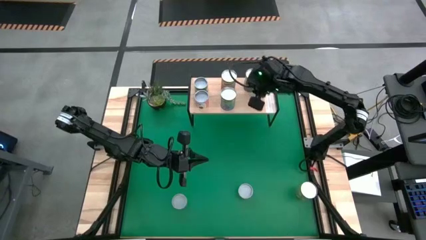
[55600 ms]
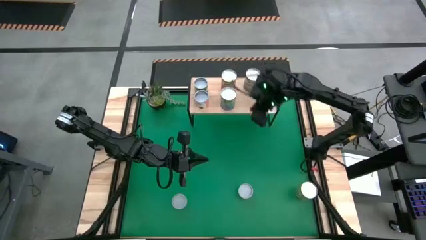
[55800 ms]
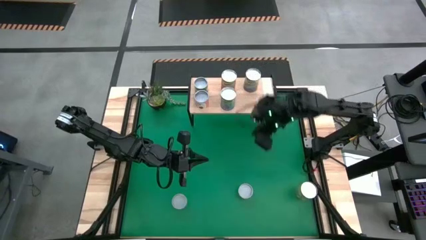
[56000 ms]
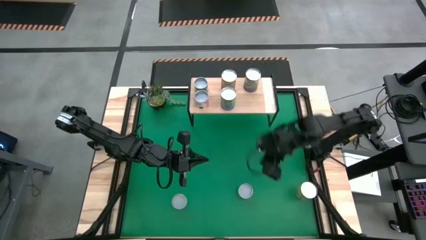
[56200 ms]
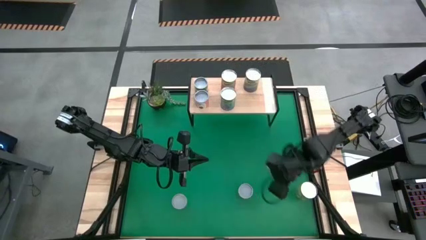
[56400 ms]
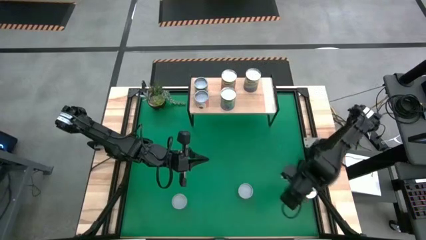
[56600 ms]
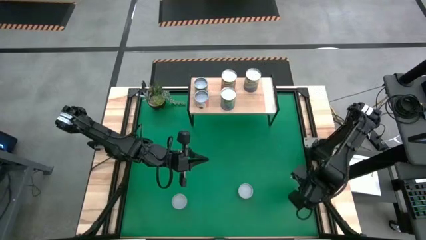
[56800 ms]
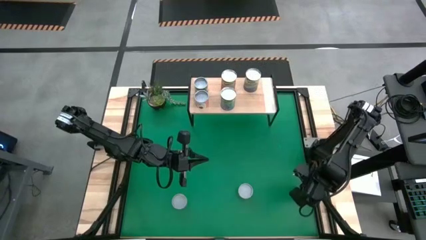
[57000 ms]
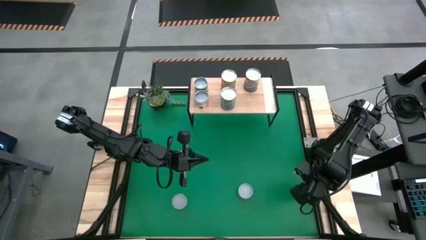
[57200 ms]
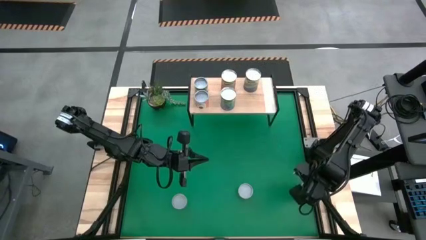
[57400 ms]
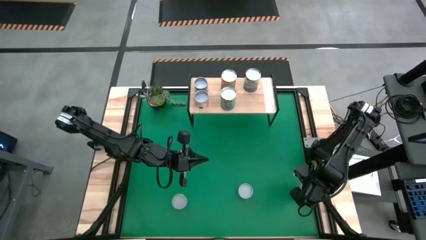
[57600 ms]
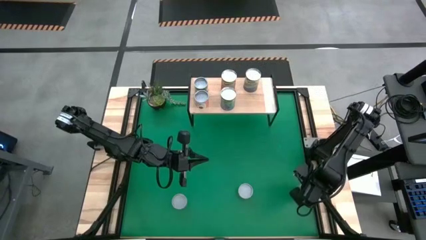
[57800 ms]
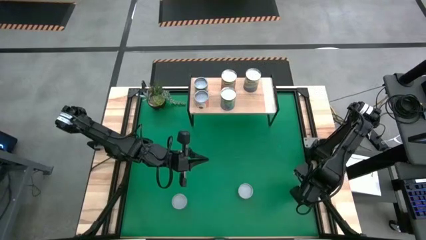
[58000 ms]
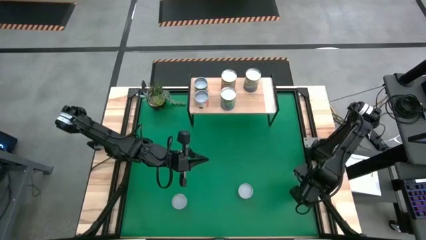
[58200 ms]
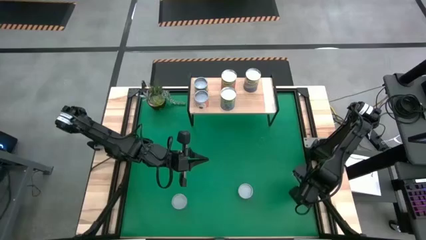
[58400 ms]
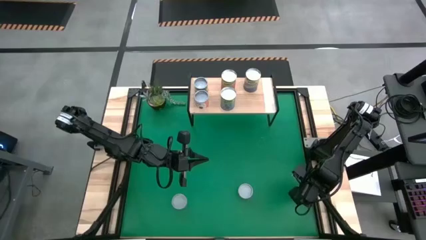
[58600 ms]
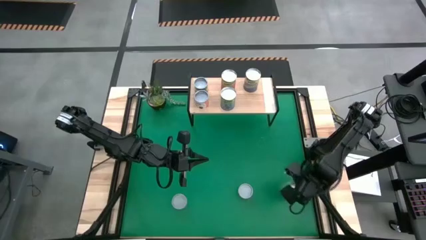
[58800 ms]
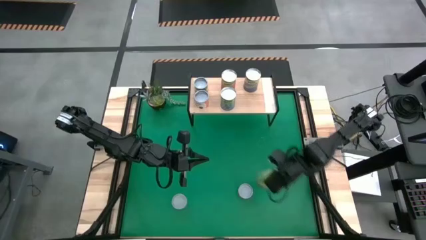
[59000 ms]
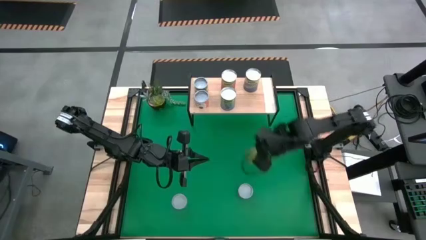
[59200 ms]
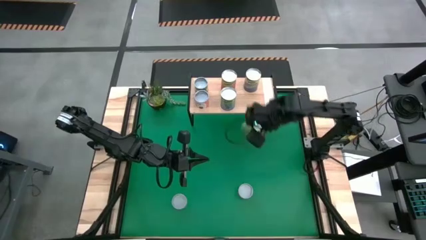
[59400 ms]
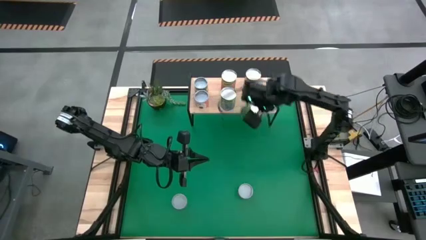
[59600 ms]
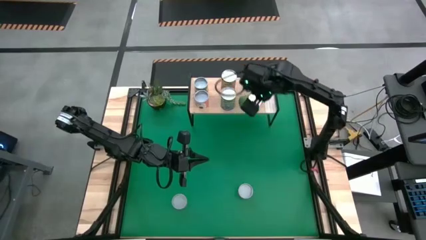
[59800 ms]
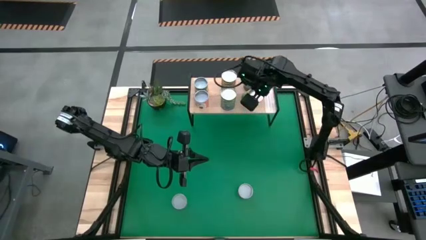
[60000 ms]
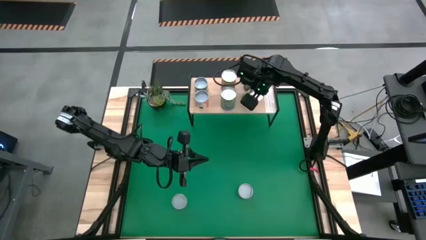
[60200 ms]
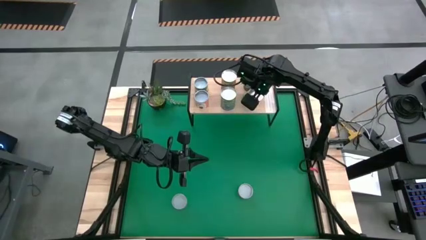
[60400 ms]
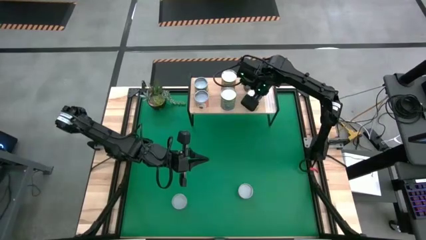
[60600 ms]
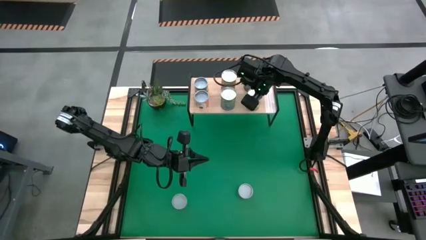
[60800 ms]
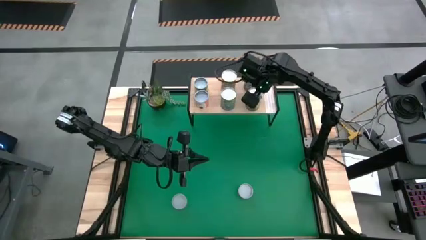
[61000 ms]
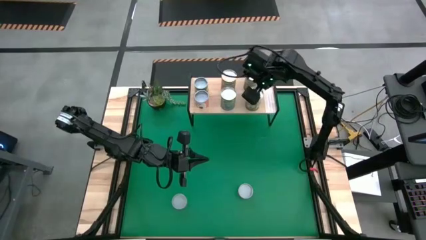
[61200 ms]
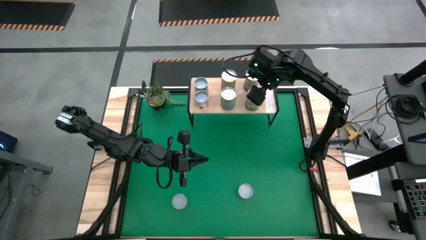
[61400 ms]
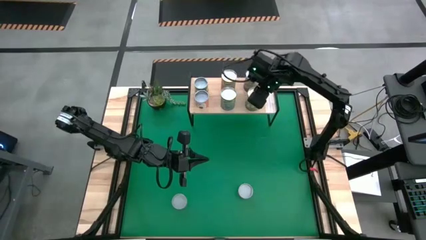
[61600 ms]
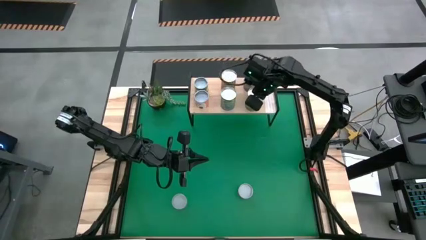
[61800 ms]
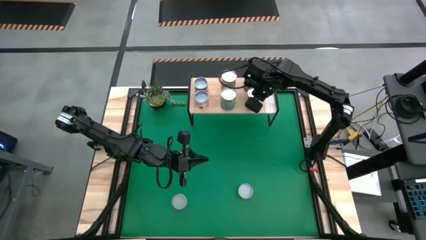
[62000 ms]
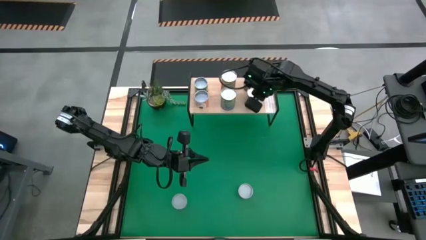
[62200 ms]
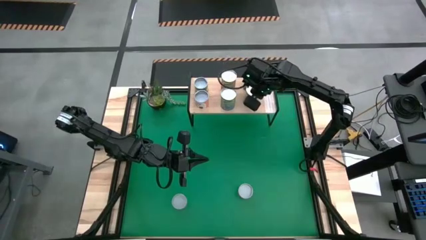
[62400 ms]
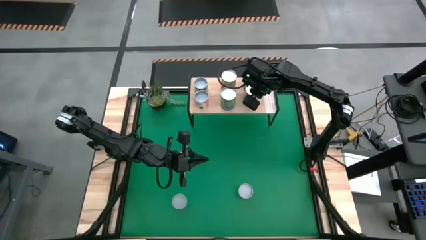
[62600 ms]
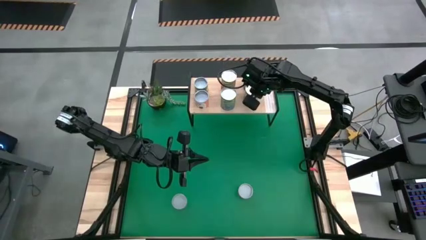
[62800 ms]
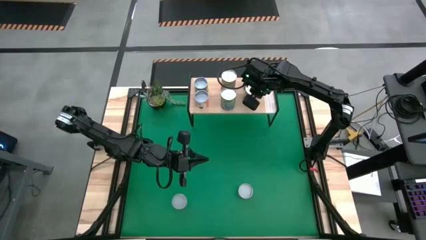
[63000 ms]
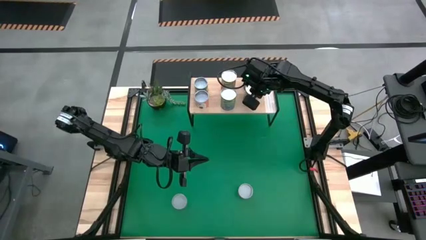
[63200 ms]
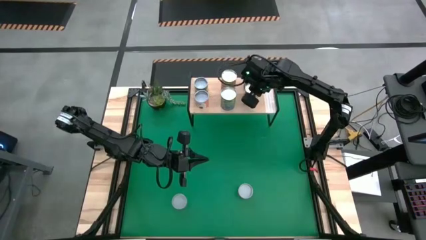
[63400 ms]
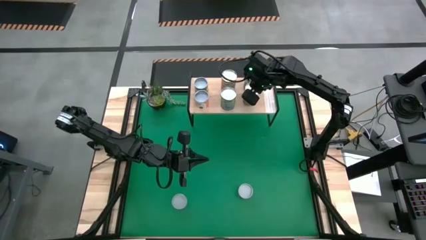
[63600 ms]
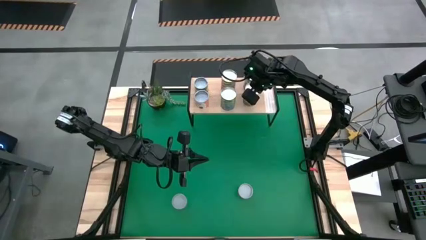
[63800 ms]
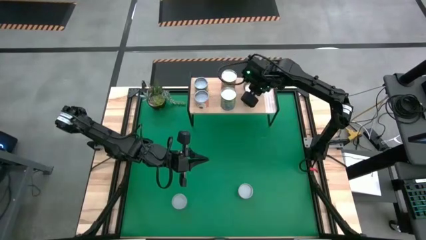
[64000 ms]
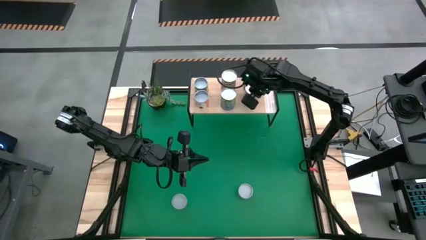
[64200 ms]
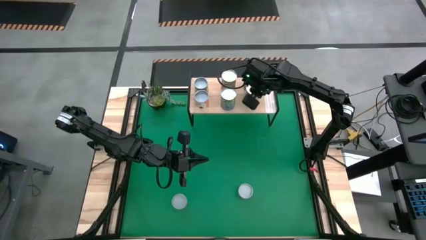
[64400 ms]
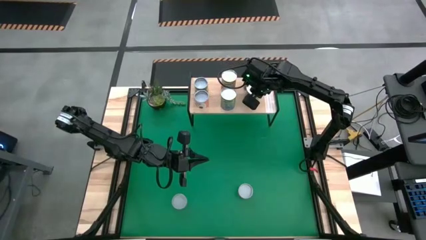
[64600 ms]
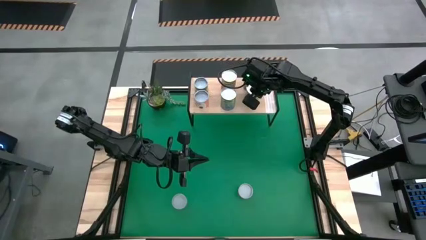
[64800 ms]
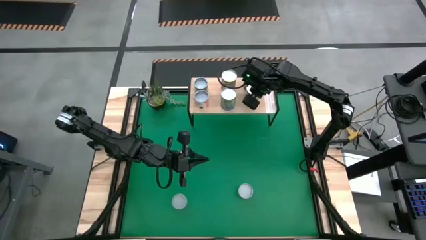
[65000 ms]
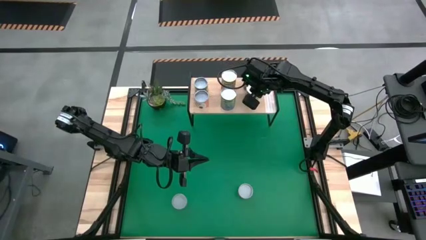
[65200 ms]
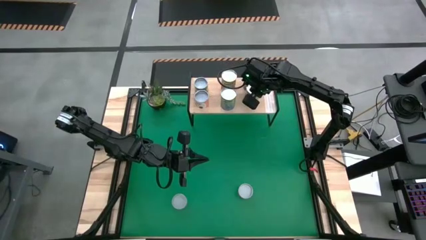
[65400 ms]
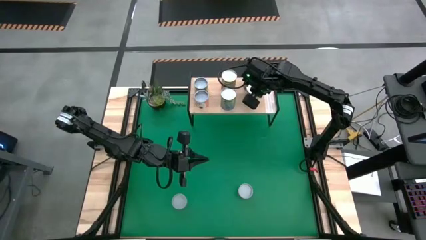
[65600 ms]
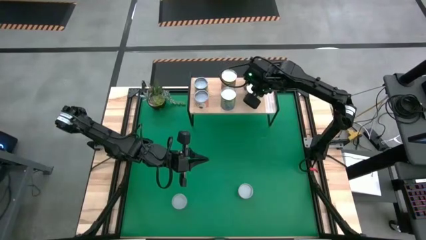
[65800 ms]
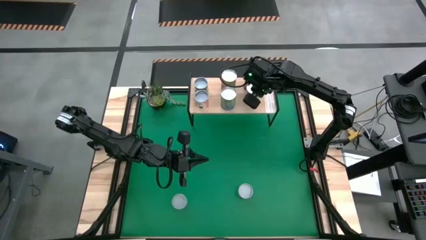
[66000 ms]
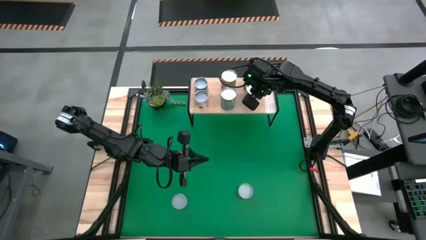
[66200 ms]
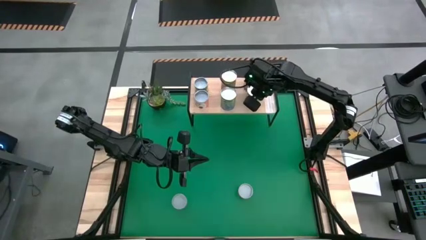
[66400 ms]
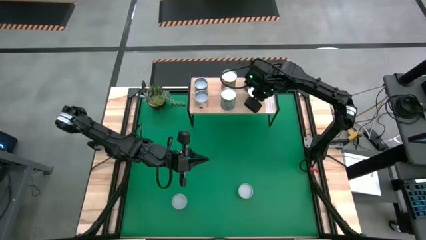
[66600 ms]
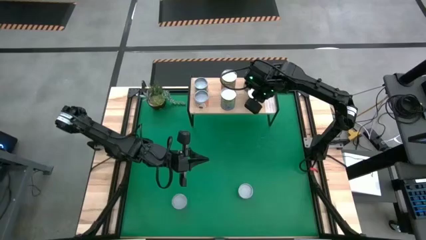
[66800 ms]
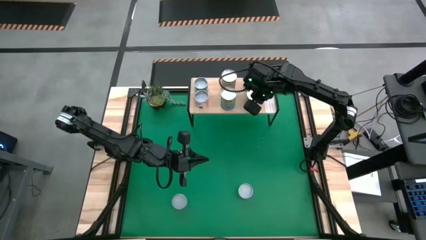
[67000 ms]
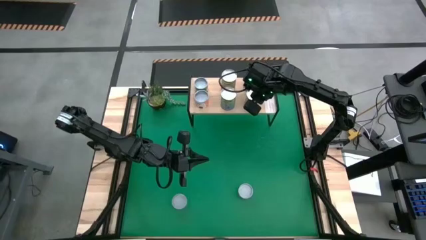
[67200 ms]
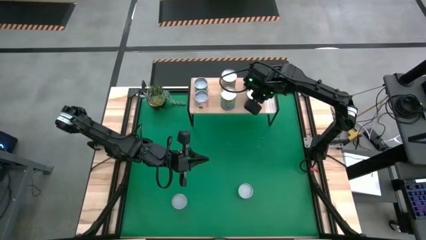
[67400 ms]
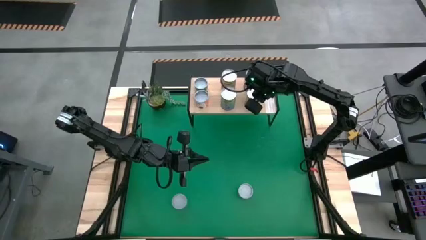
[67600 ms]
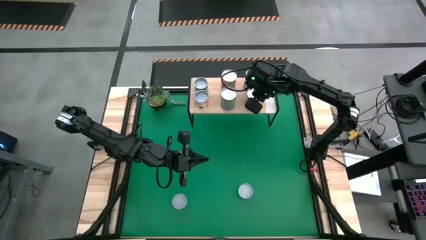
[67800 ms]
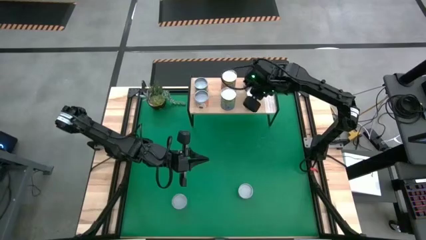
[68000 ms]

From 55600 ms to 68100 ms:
Task: Pick and place cans onto a shelf
Put the canned pears on the shelf

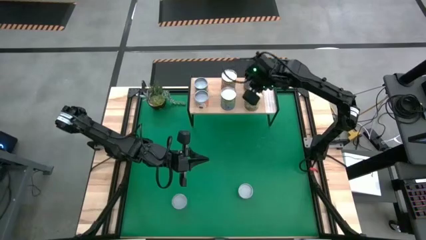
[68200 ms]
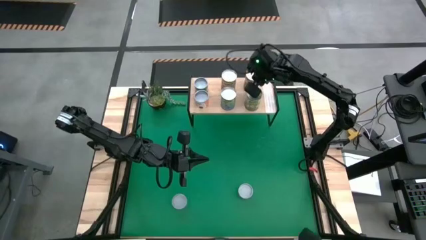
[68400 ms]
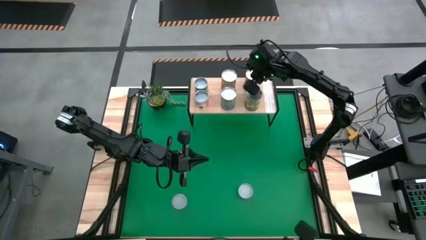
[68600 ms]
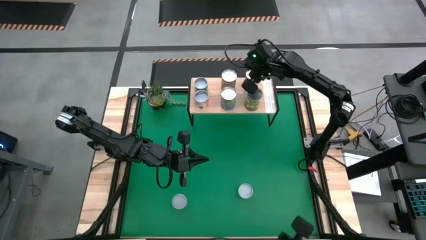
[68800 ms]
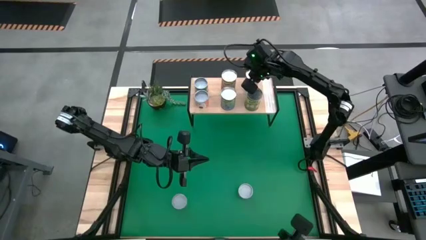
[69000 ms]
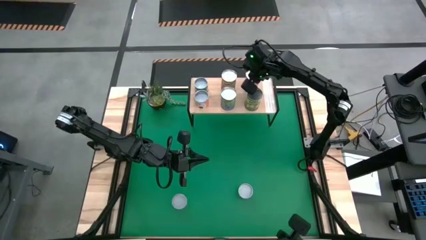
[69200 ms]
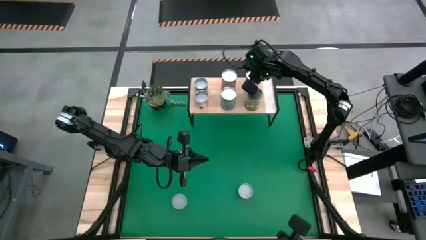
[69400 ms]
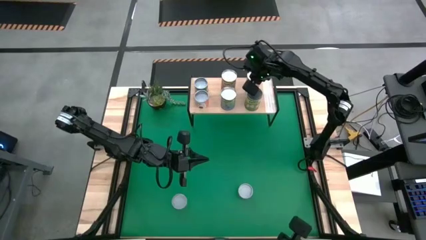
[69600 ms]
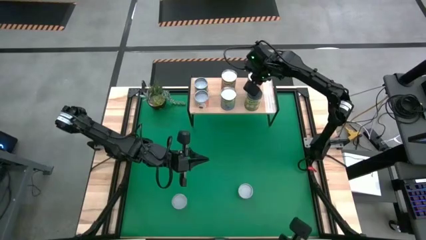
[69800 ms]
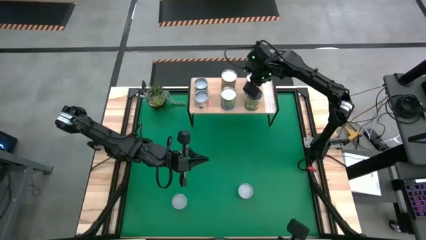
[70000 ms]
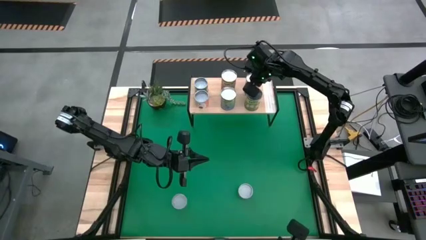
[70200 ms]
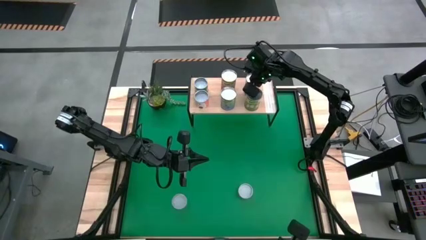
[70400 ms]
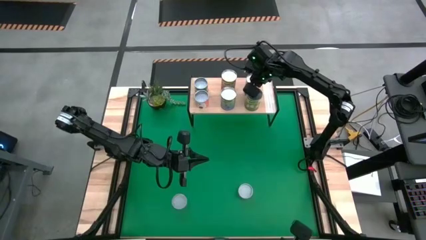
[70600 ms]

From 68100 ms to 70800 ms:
Adjust the canned peas on the shelf

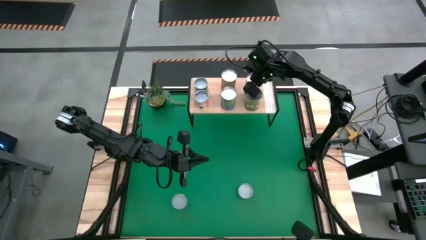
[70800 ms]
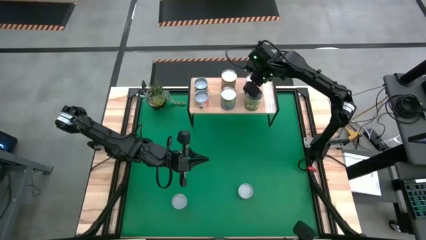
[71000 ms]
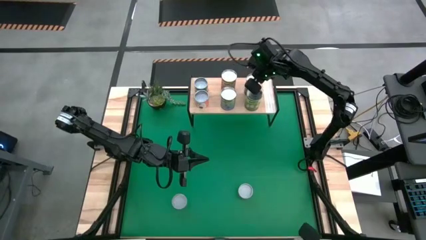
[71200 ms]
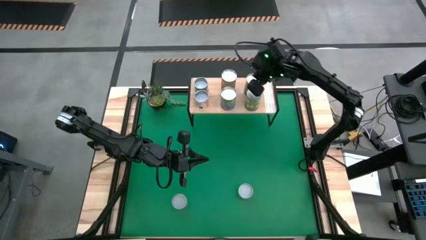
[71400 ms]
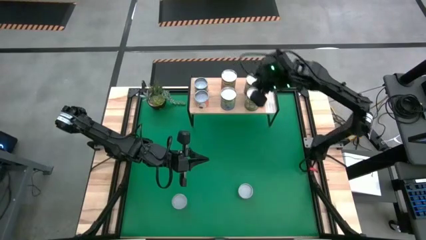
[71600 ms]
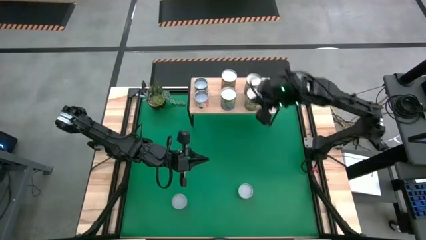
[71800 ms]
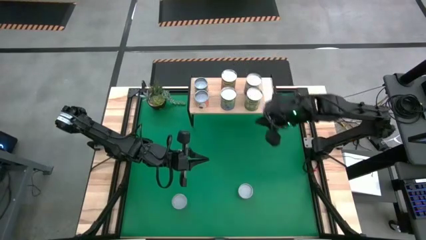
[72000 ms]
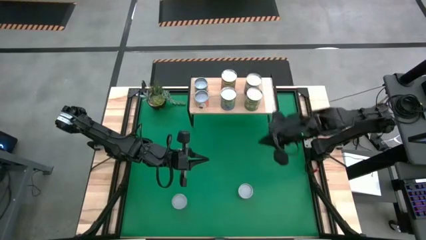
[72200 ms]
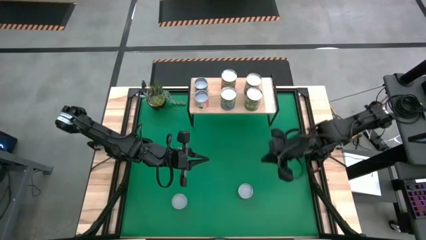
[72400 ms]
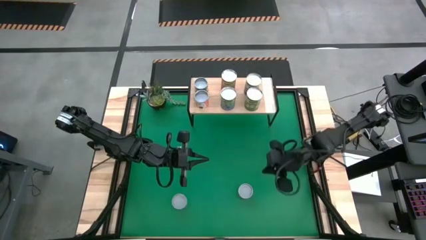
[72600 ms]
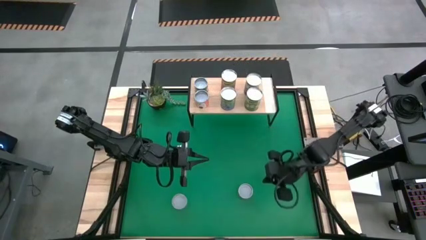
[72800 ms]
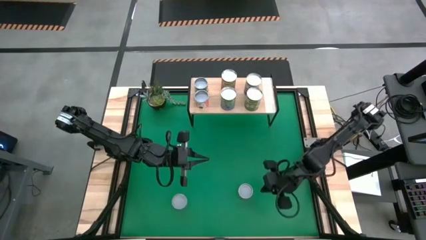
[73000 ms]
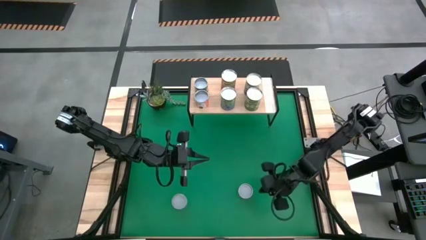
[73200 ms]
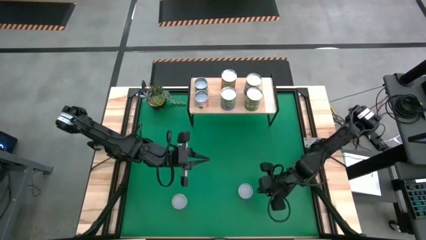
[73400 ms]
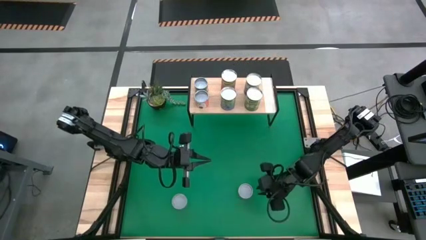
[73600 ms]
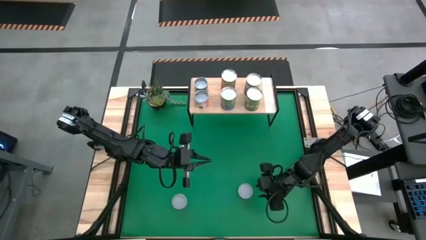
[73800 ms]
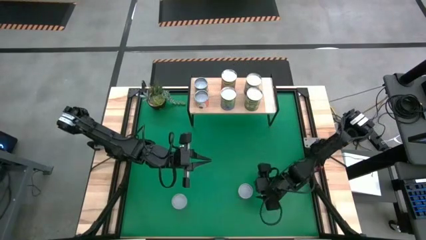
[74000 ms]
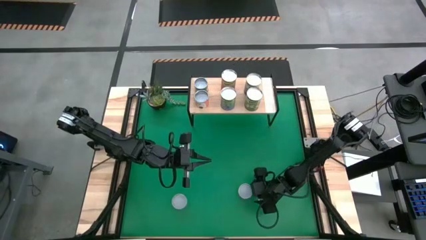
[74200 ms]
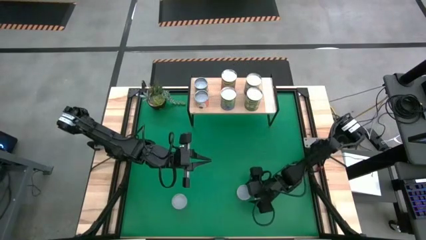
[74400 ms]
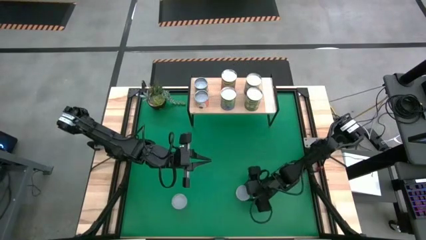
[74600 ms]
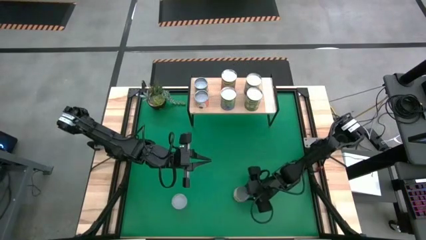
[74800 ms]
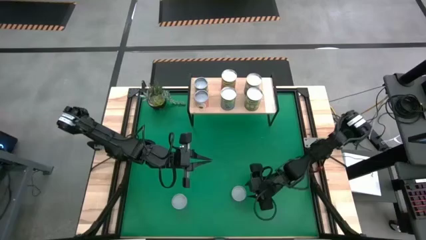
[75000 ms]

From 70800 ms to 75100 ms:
Put the canned mushroom on the shelf
